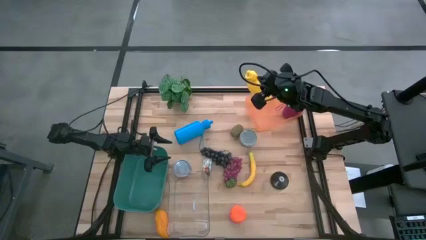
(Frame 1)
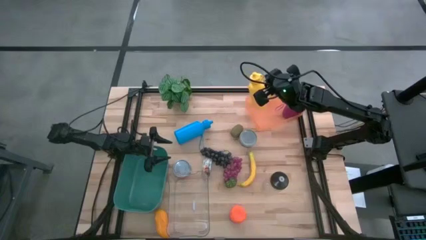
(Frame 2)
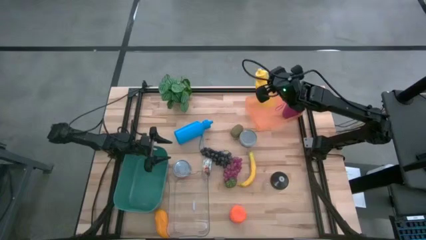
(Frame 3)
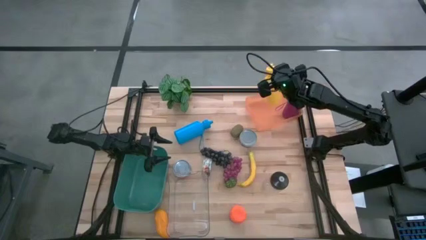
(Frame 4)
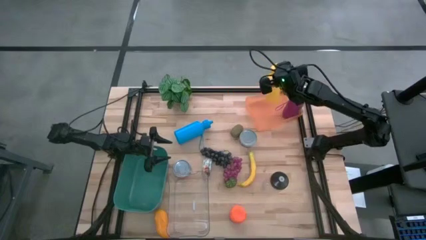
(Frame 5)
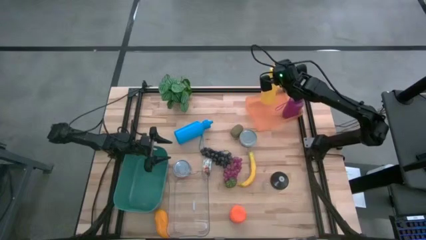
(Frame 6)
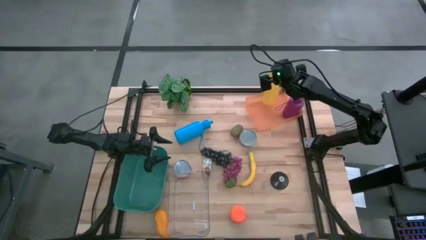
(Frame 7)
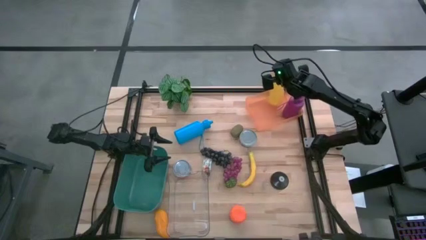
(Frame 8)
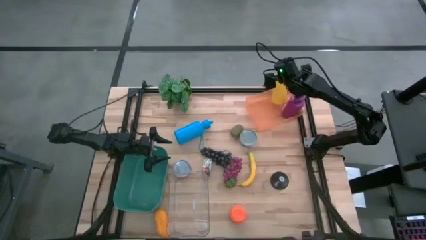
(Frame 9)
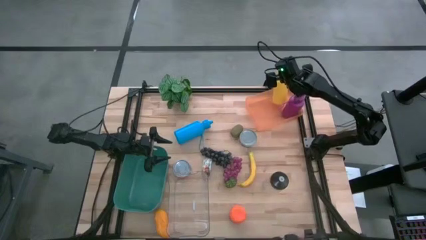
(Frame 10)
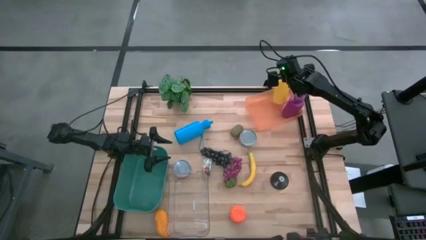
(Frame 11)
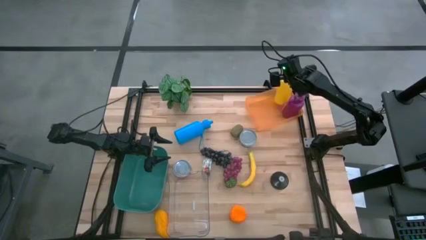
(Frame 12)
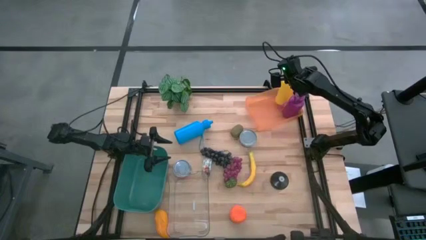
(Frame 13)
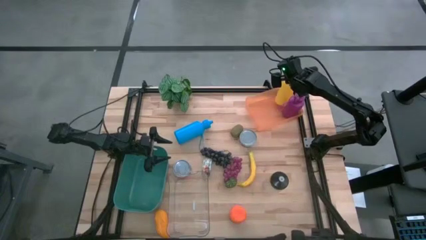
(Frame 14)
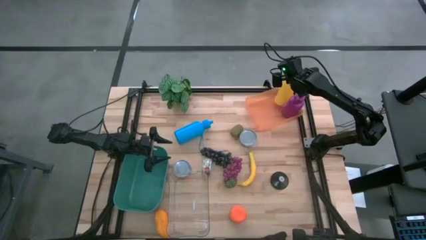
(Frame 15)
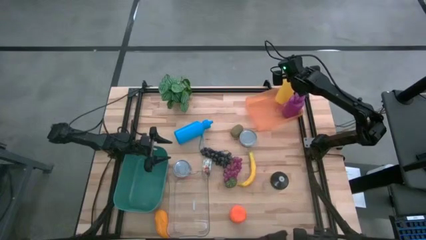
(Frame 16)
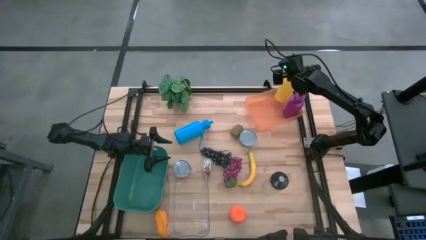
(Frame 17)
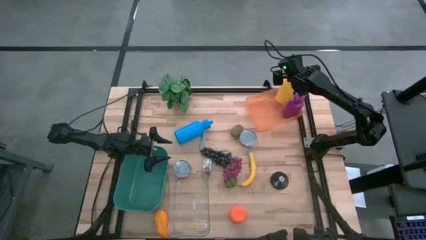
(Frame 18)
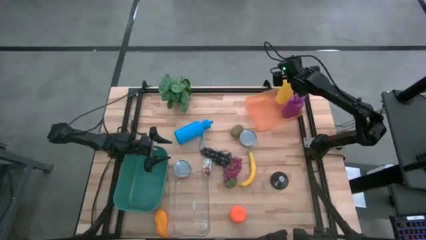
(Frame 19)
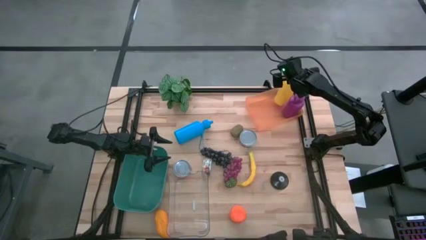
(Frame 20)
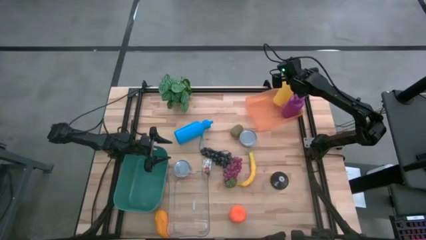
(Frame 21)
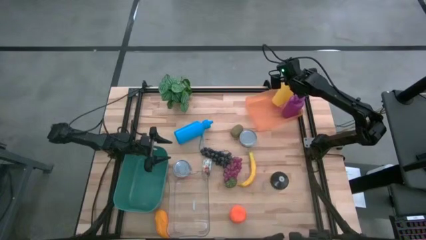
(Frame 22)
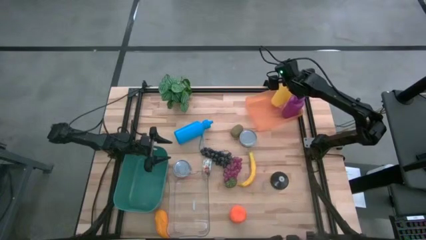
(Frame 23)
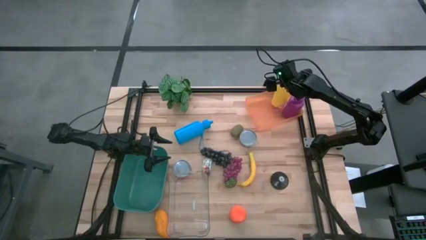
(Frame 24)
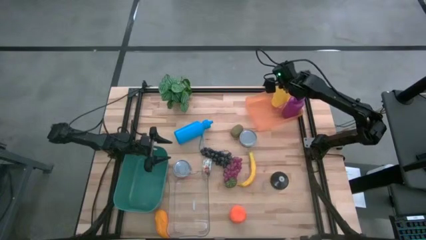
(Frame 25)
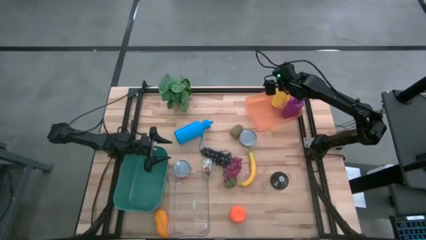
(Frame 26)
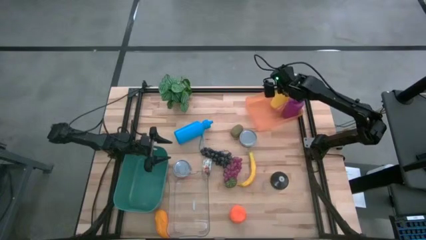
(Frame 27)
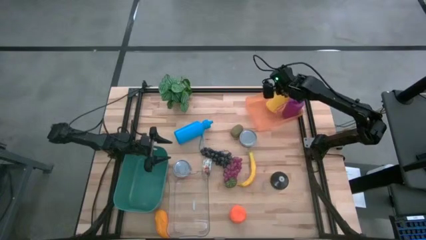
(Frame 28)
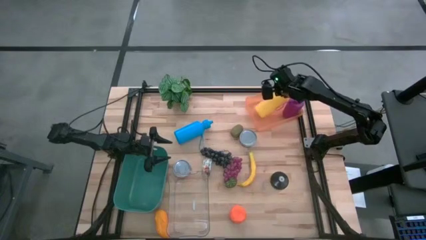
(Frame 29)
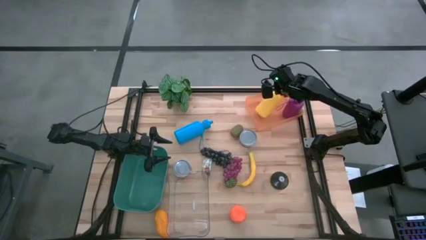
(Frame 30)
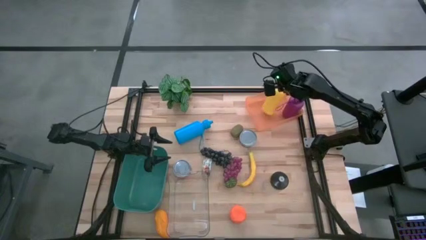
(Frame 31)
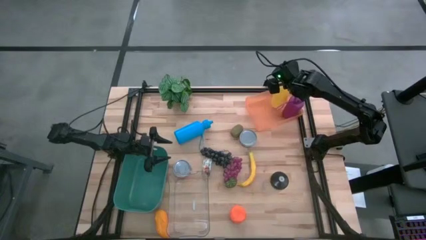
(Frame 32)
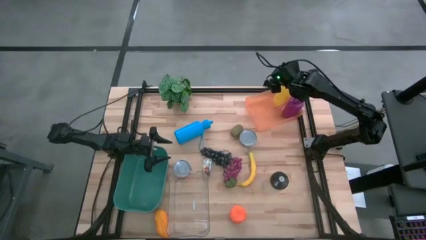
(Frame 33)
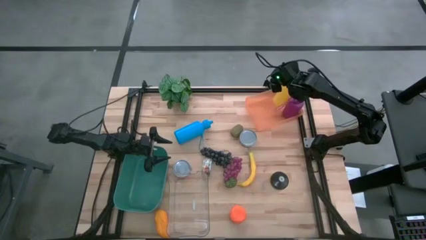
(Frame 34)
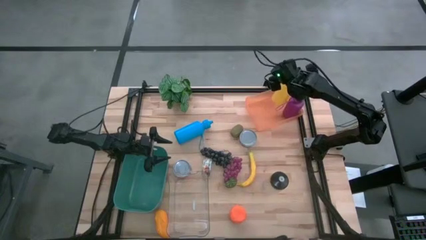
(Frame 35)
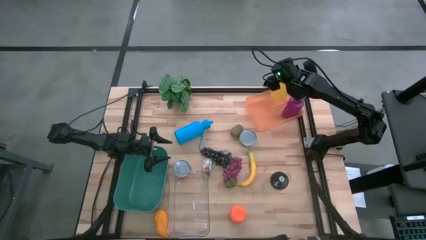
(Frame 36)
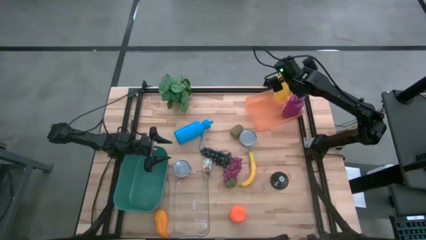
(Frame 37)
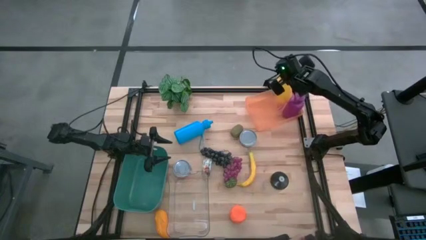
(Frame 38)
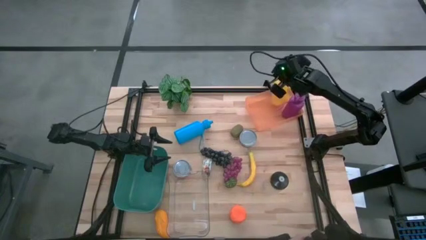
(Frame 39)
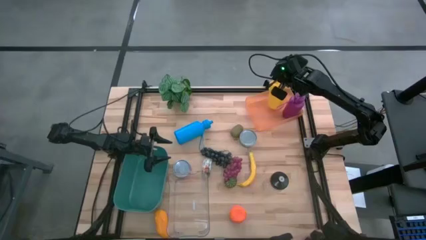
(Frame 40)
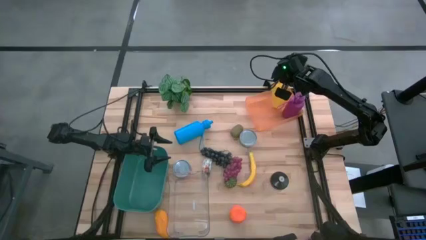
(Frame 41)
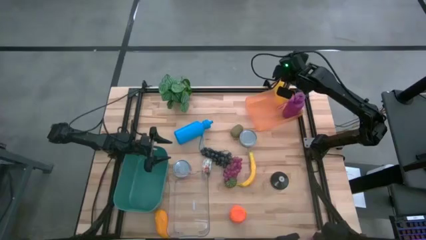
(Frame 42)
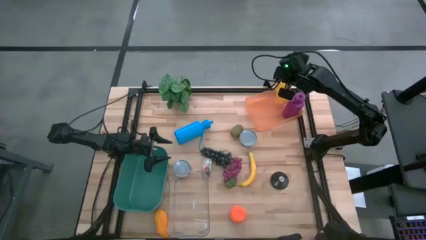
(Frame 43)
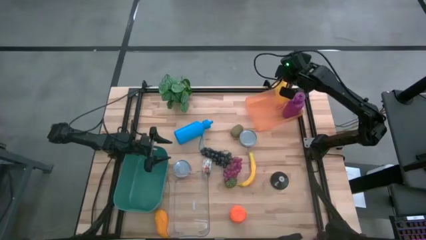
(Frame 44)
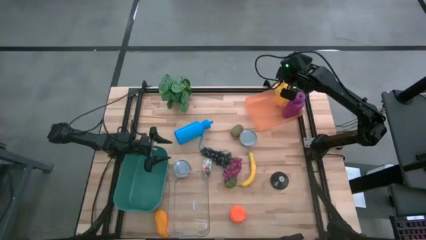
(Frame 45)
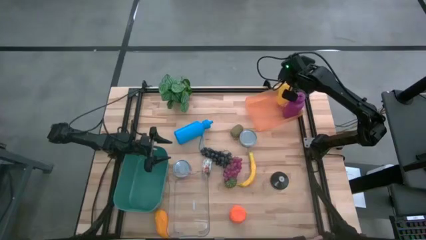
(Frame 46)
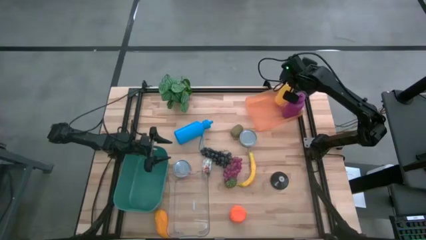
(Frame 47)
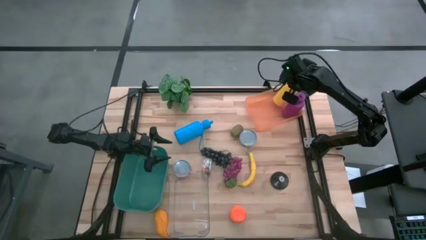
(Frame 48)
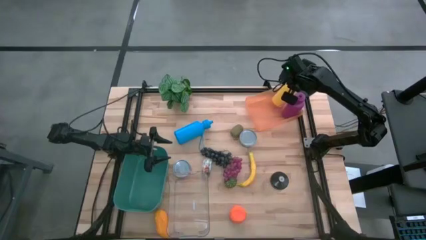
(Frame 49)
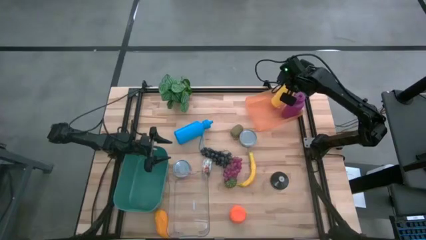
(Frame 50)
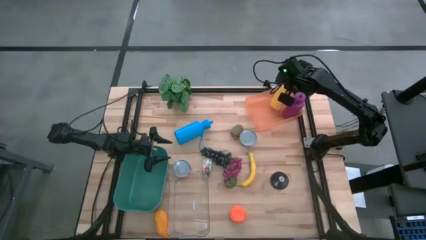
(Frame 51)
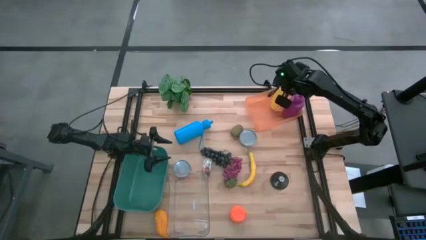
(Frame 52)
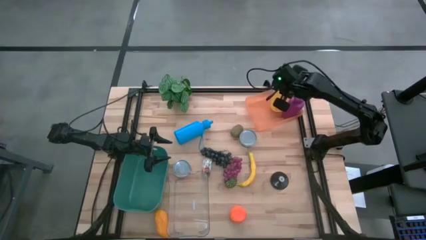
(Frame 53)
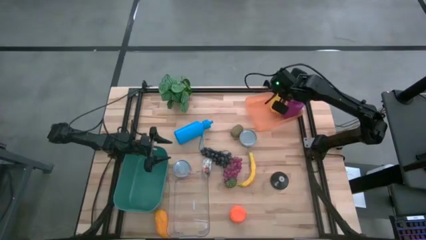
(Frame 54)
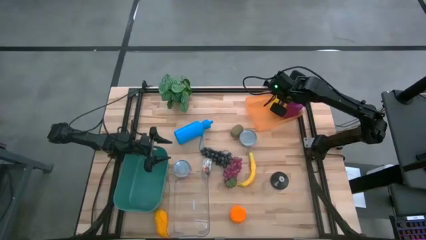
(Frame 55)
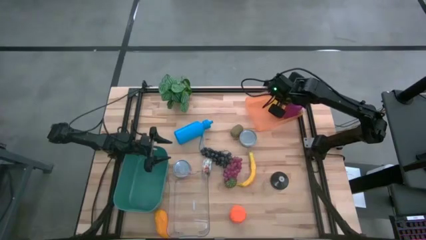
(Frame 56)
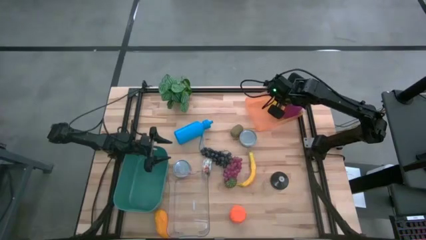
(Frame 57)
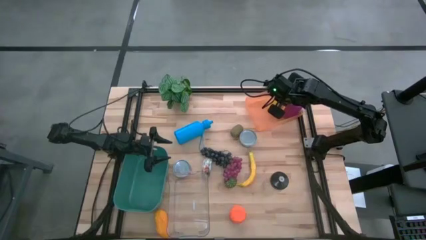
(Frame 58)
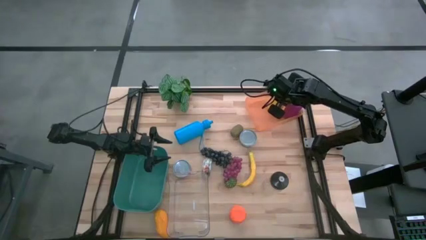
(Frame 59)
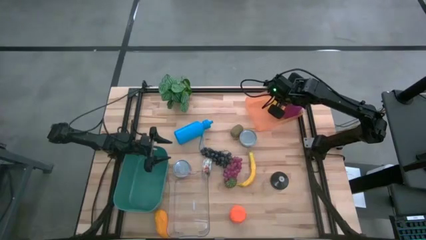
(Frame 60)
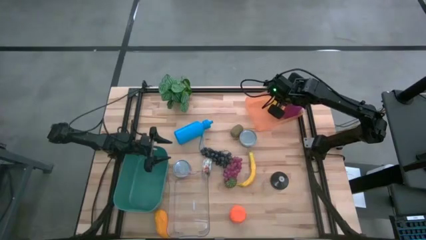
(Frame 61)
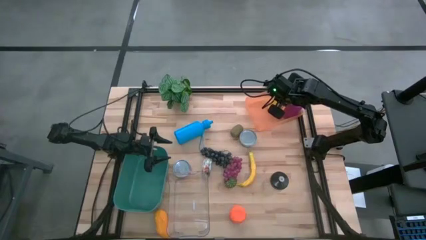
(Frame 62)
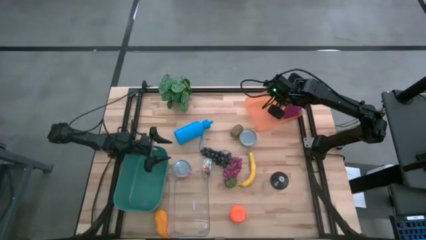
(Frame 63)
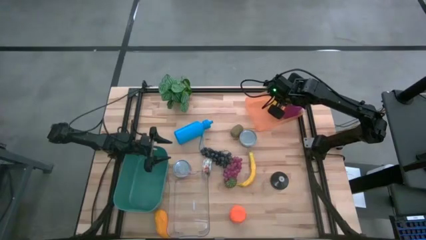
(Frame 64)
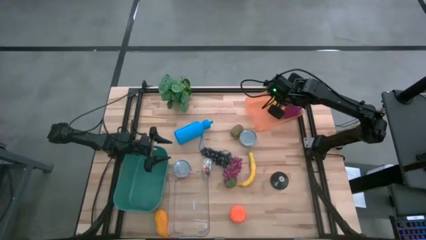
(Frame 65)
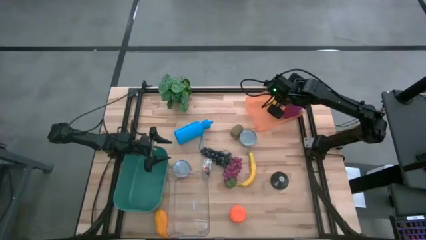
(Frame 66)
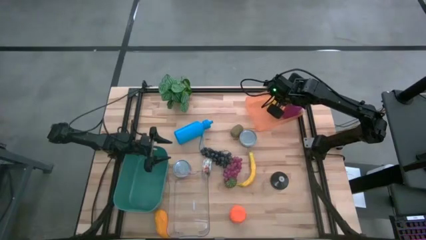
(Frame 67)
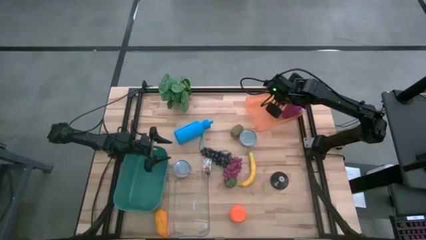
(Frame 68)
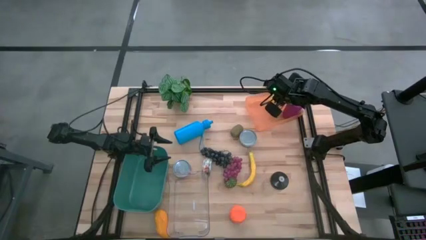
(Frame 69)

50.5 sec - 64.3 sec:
Task: Pick & Place Food Item
Put the yellow tumbler into the orange bin

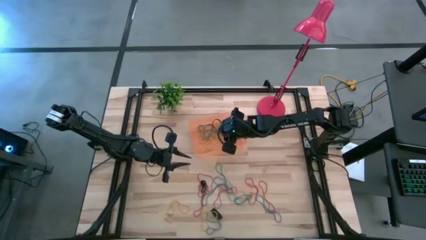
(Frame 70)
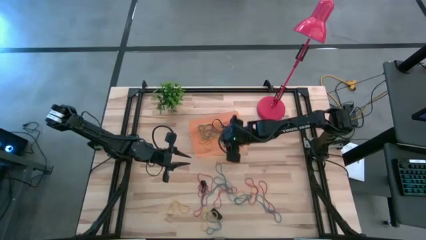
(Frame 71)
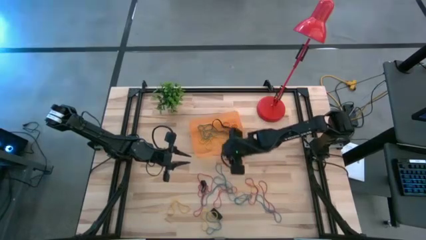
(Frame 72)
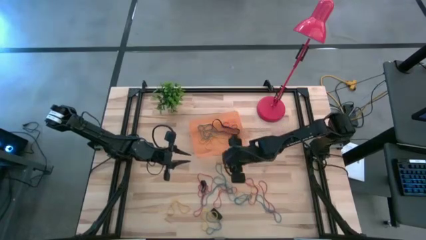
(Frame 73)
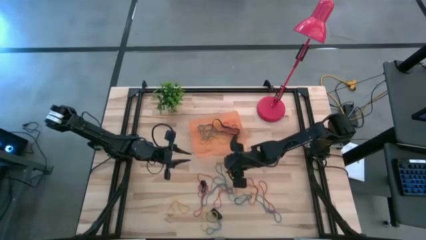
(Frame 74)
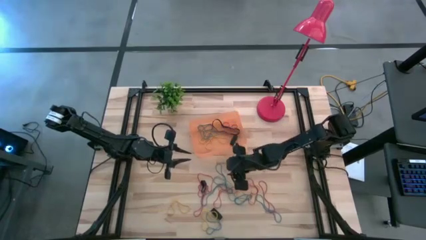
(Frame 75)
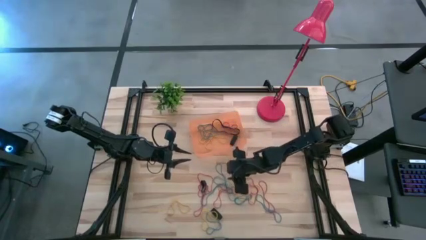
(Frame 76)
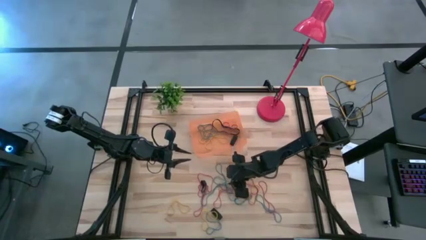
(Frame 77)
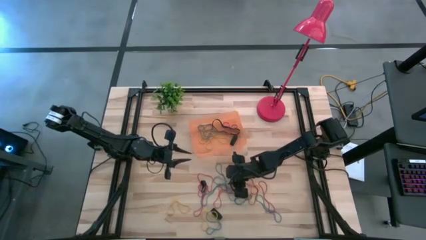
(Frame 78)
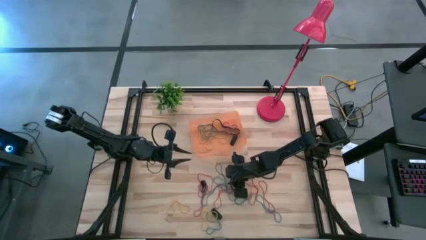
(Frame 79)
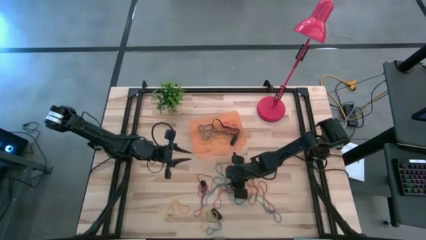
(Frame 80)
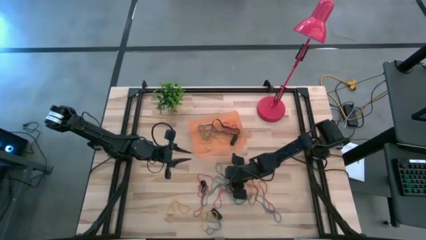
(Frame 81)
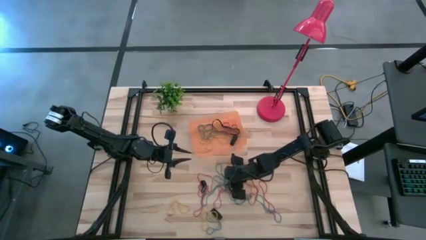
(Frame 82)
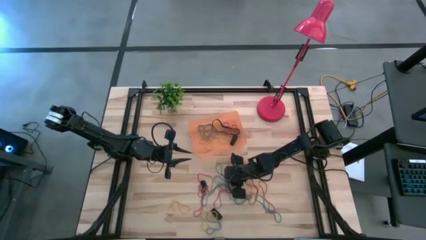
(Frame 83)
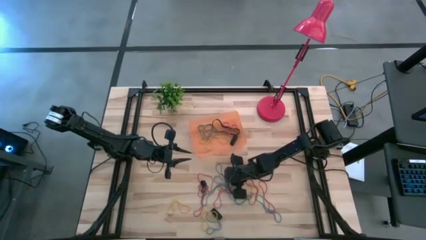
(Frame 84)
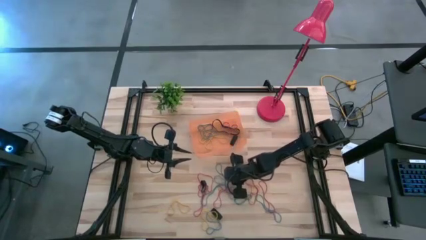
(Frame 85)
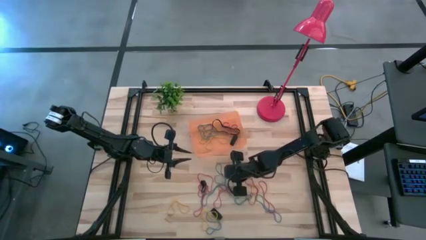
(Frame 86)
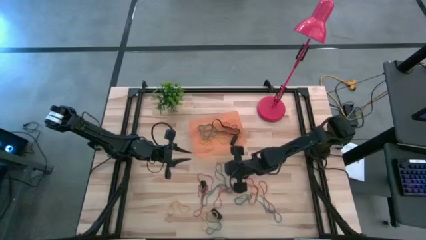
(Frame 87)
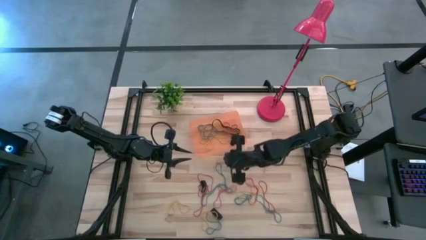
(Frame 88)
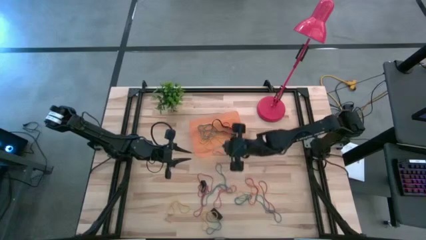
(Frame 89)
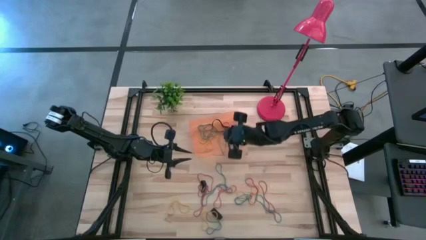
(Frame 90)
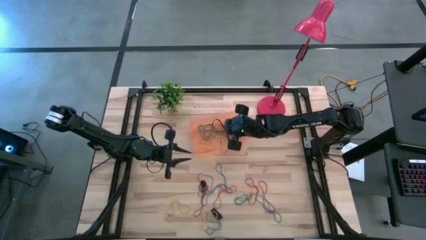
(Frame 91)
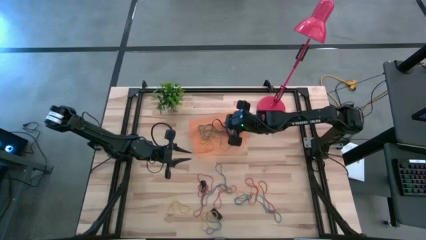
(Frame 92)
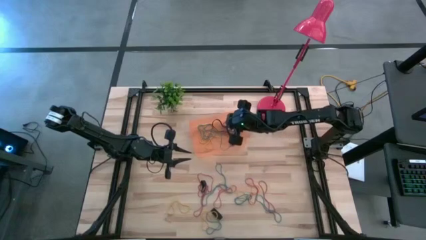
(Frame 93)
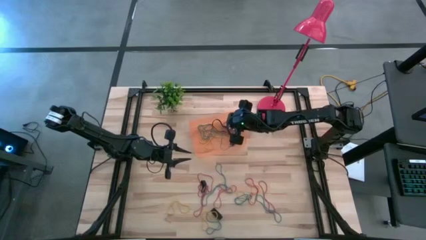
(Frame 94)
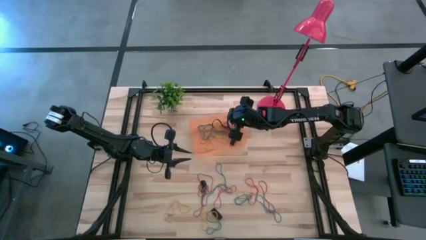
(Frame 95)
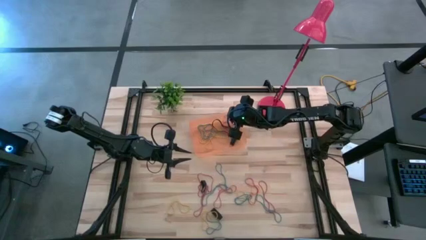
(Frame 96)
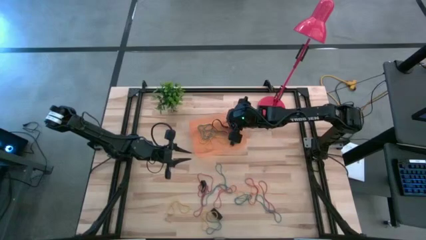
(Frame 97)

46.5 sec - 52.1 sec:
Task: Pick and place rubber bands into bin
Put the blue rubber band into the orange bin
